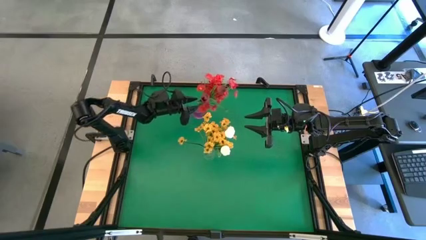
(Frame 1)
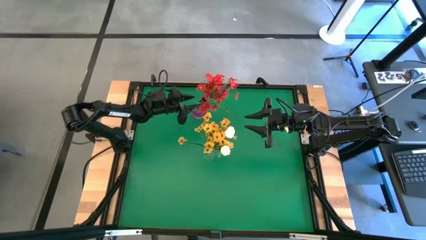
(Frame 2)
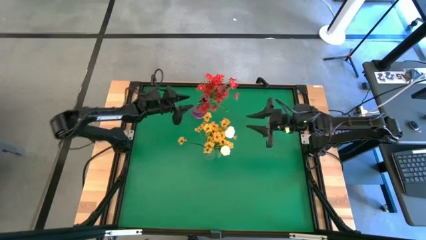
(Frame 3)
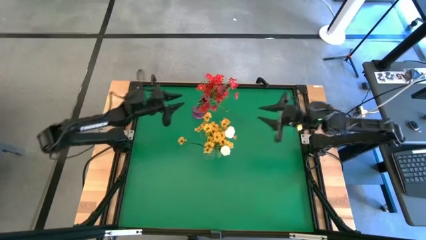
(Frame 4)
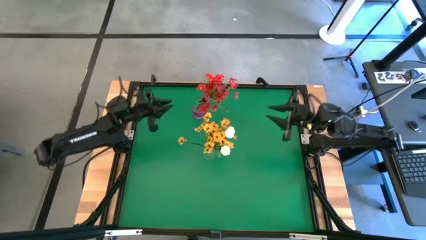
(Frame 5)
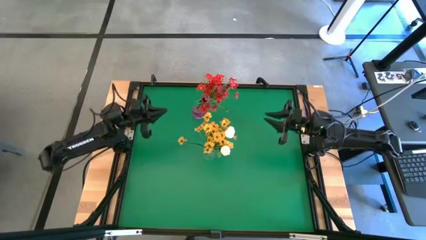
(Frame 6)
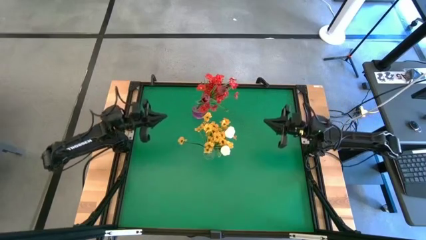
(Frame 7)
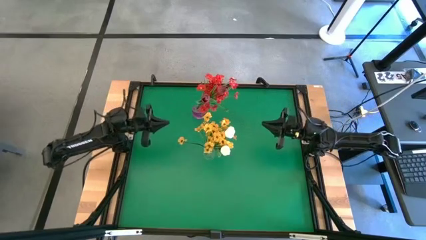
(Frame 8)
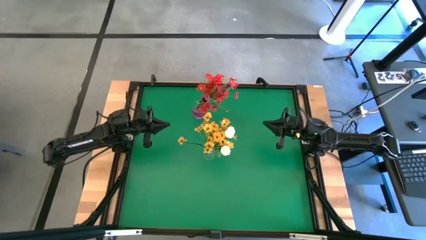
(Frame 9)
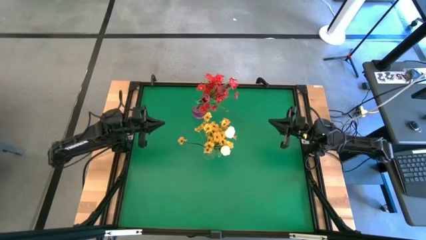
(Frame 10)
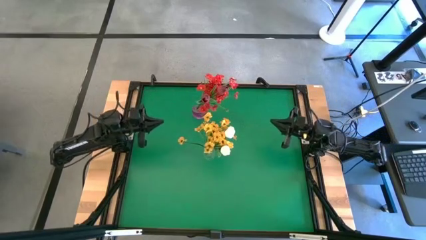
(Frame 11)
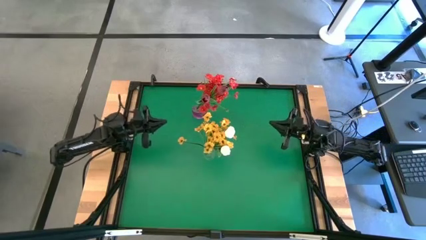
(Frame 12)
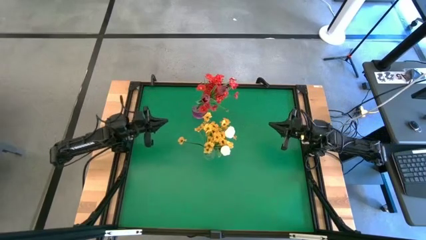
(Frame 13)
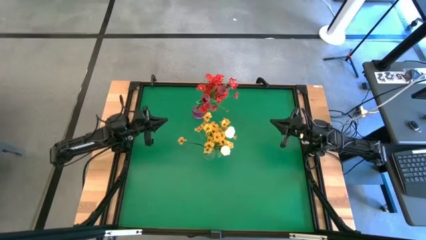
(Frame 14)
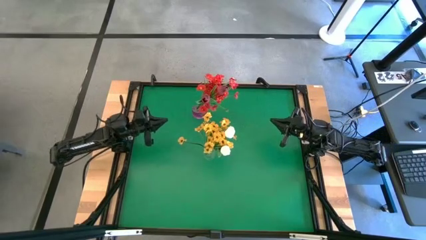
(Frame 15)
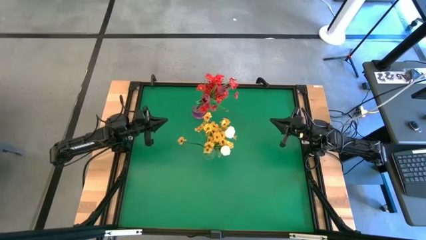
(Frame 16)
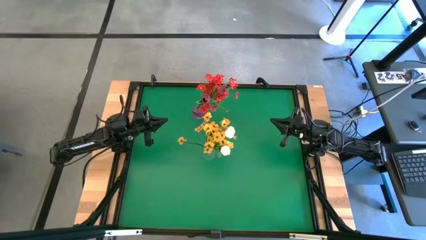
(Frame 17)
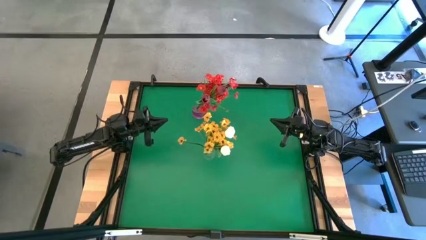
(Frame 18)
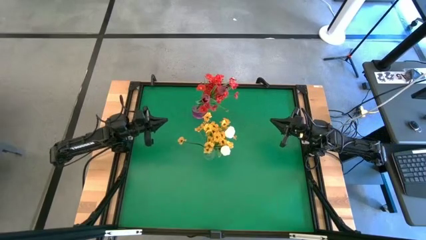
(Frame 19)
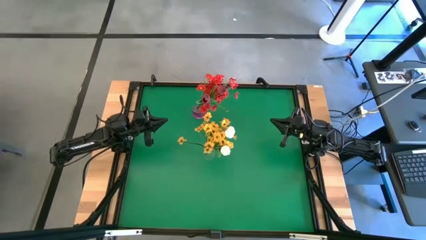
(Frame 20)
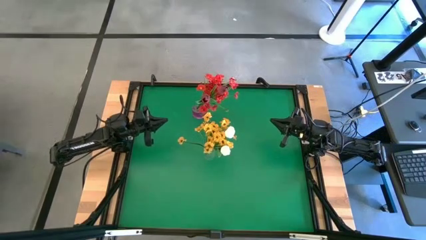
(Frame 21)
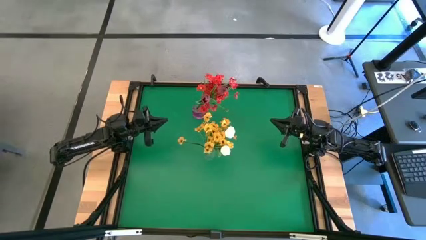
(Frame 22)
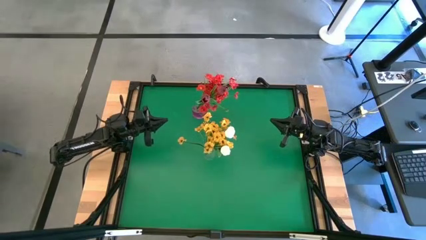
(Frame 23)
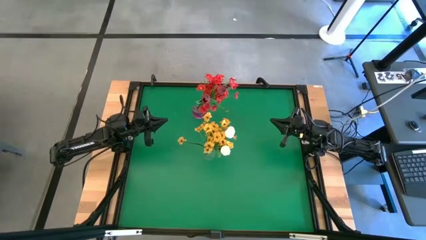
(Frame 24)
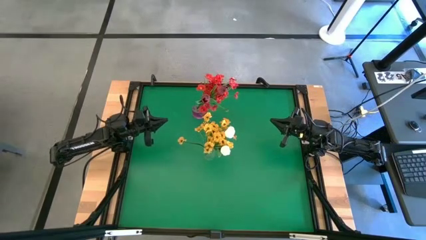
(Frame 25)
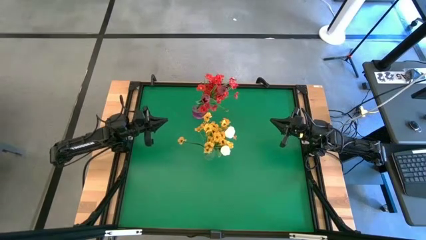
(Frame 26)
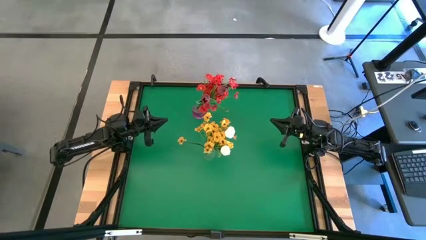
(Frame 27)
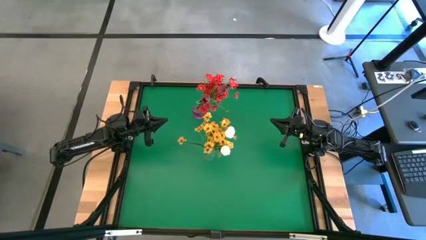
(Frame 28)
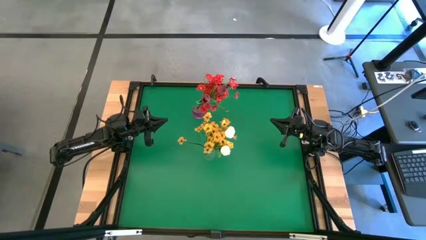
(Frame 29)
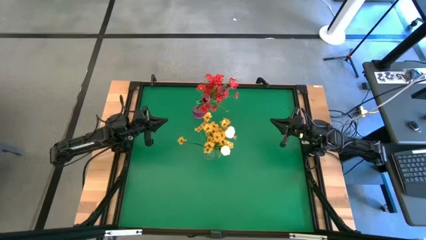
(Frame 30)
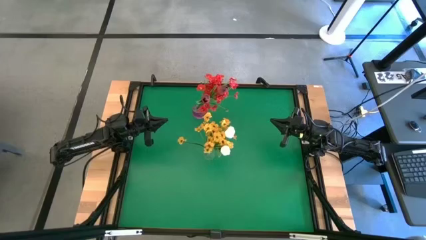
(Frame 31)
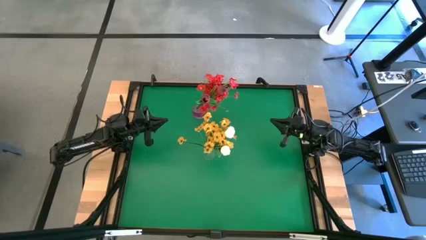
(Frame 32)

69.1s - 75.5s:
Task: Sort flowers into vase by color
Return to Home Position

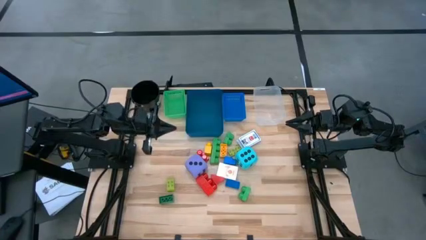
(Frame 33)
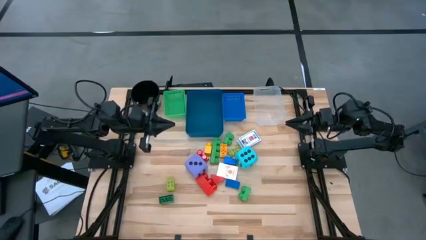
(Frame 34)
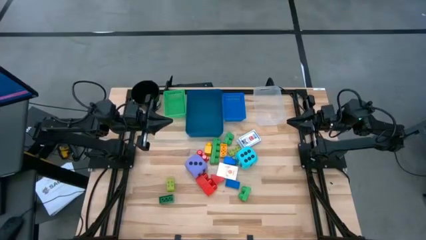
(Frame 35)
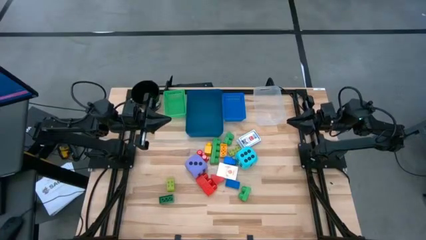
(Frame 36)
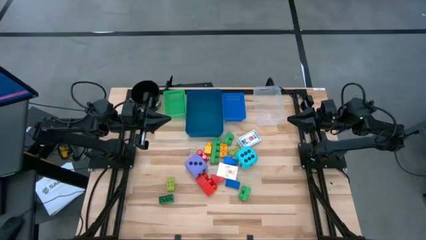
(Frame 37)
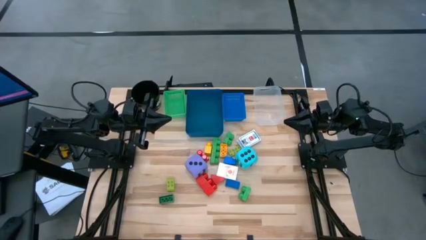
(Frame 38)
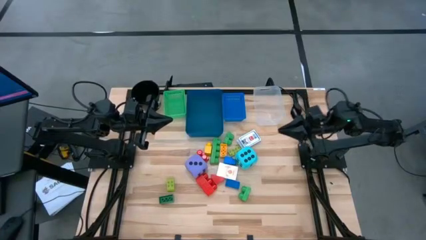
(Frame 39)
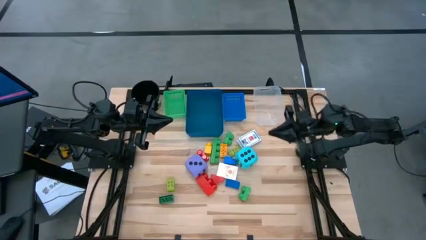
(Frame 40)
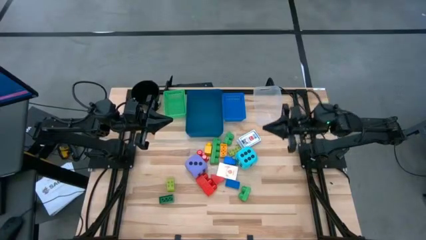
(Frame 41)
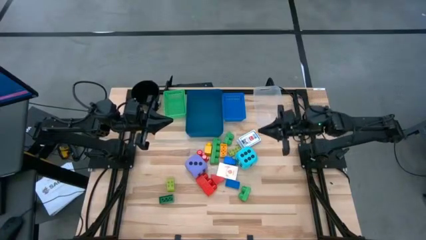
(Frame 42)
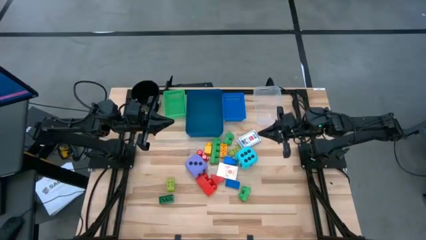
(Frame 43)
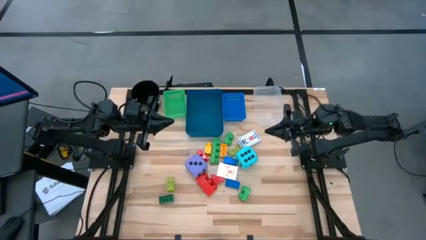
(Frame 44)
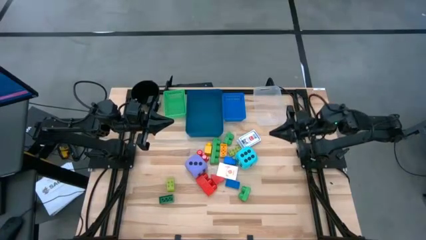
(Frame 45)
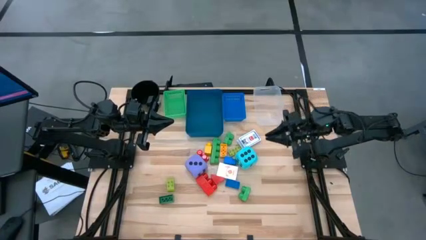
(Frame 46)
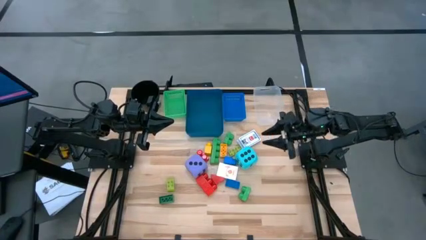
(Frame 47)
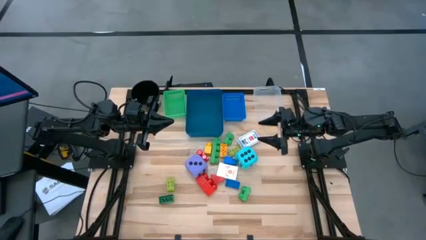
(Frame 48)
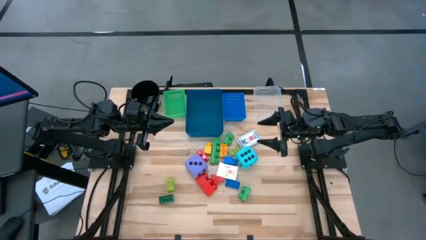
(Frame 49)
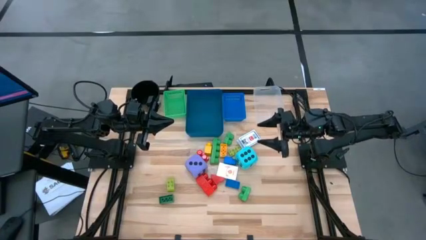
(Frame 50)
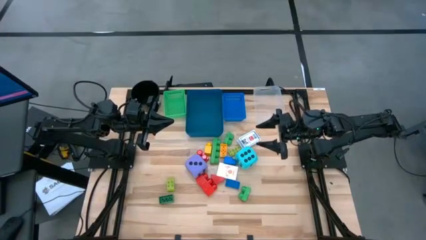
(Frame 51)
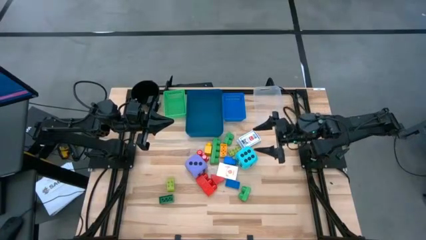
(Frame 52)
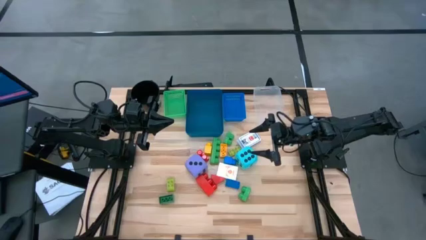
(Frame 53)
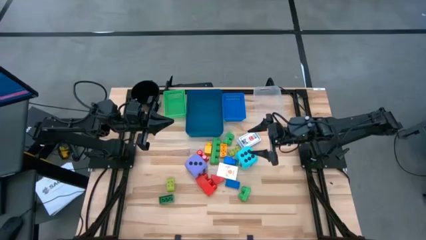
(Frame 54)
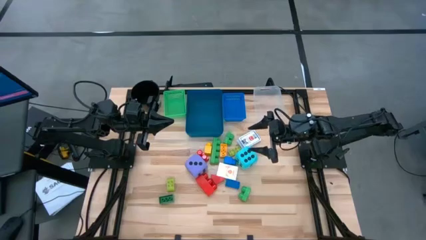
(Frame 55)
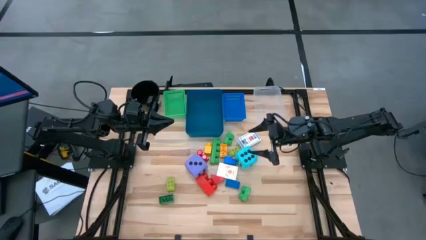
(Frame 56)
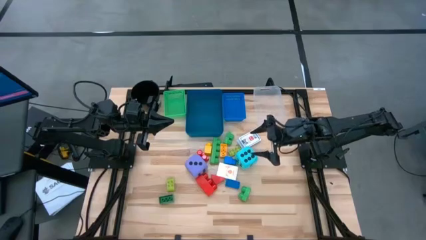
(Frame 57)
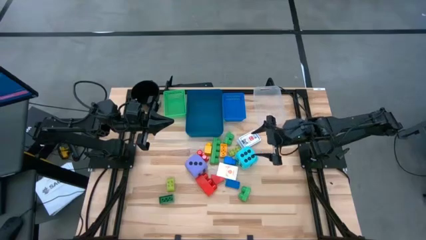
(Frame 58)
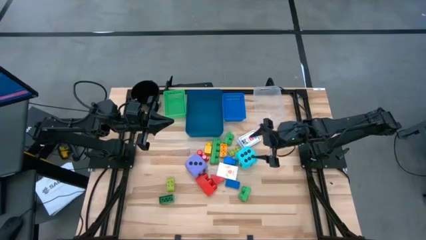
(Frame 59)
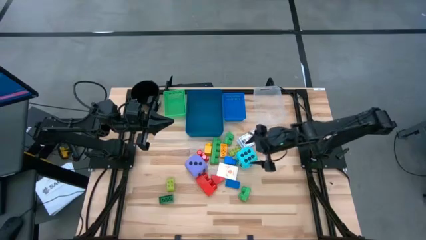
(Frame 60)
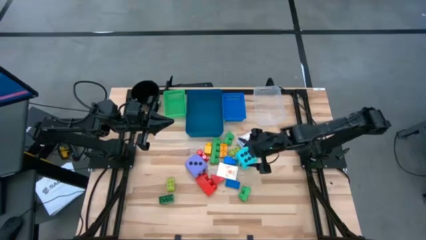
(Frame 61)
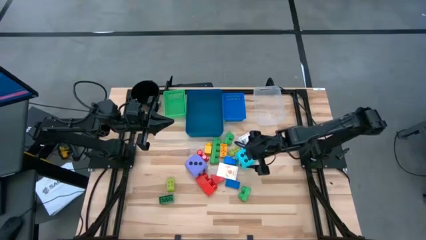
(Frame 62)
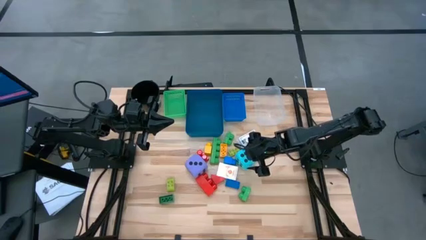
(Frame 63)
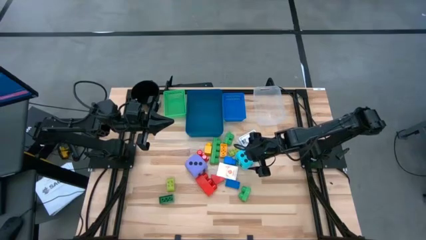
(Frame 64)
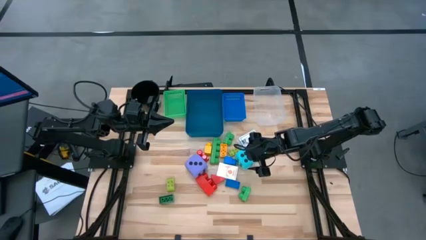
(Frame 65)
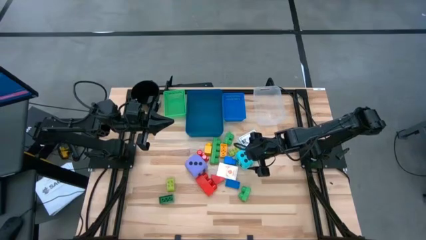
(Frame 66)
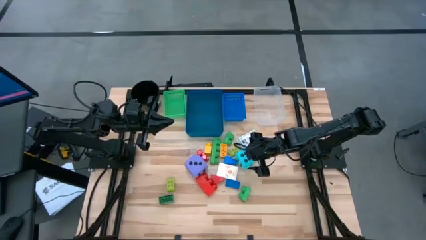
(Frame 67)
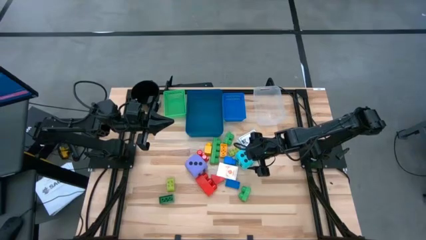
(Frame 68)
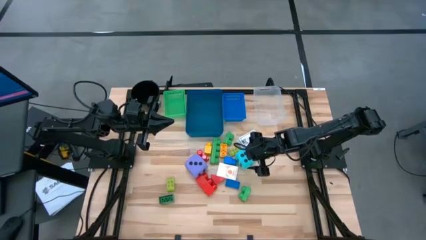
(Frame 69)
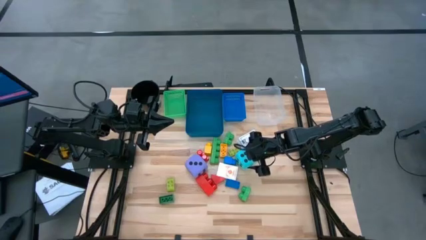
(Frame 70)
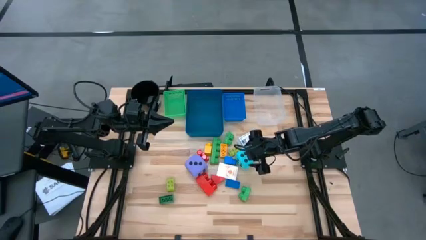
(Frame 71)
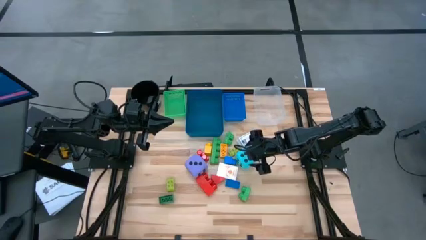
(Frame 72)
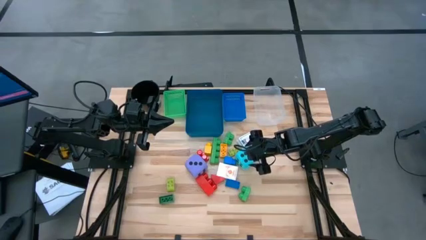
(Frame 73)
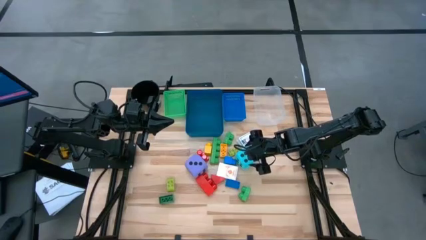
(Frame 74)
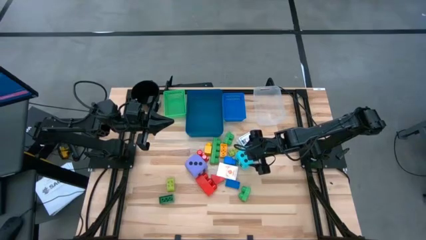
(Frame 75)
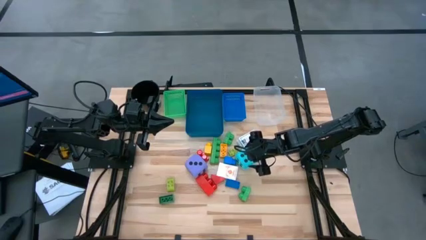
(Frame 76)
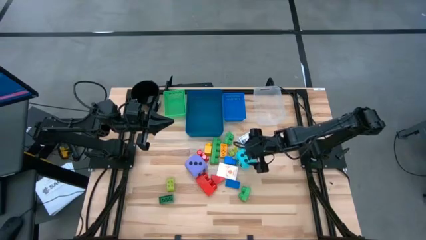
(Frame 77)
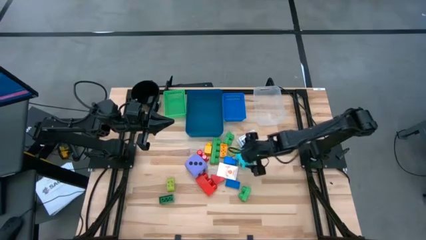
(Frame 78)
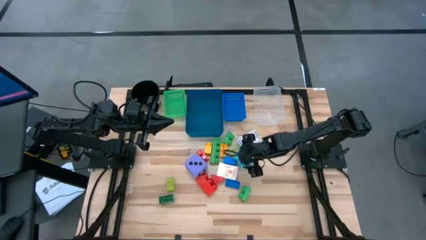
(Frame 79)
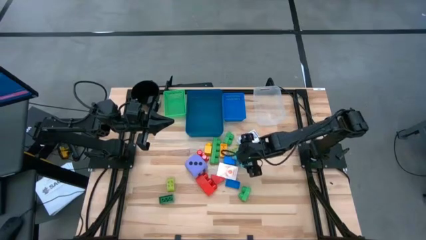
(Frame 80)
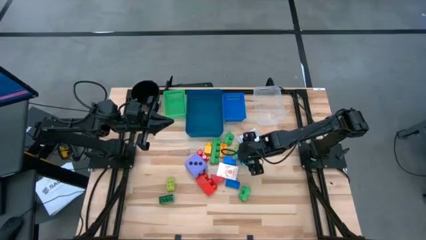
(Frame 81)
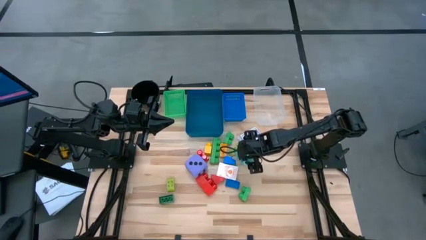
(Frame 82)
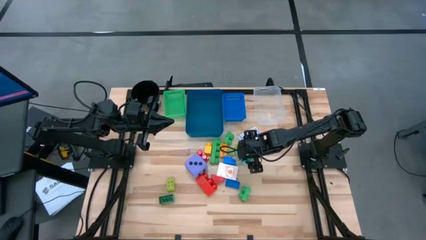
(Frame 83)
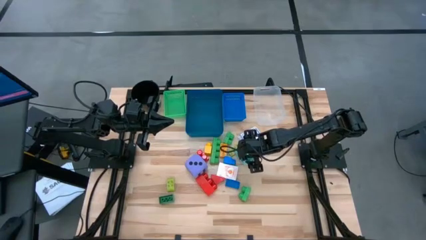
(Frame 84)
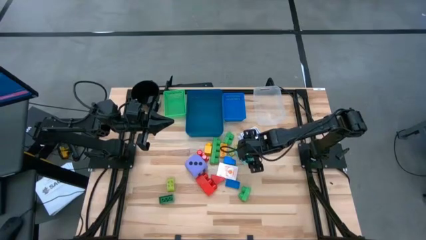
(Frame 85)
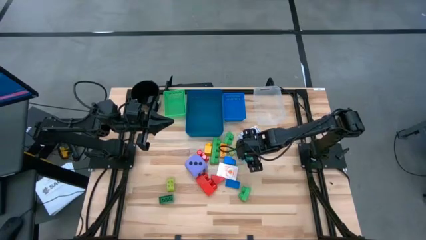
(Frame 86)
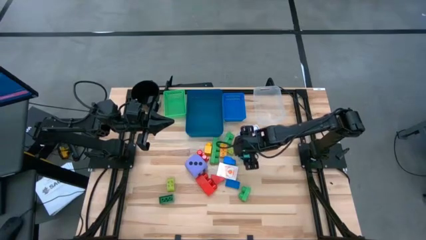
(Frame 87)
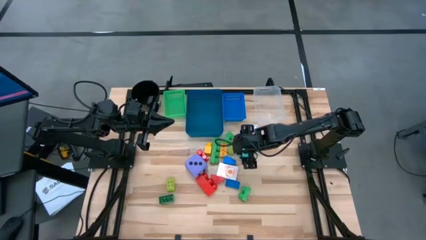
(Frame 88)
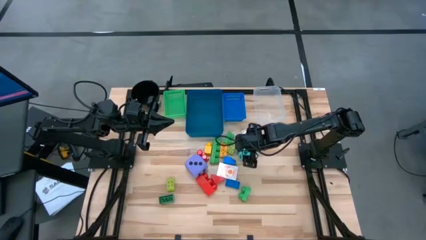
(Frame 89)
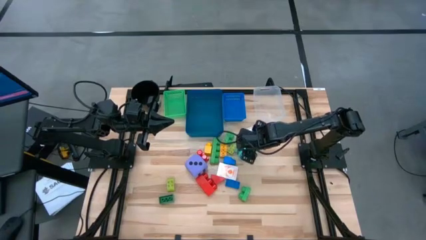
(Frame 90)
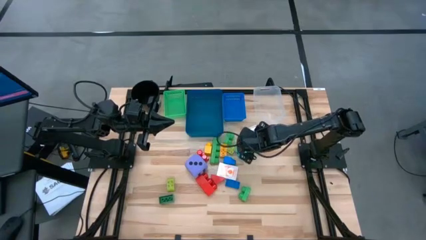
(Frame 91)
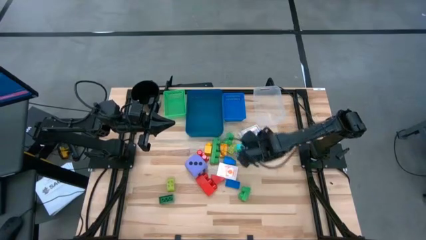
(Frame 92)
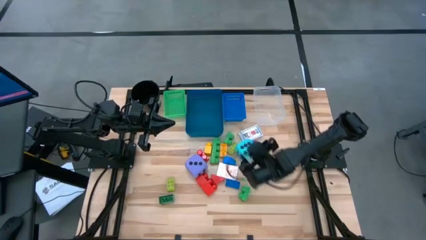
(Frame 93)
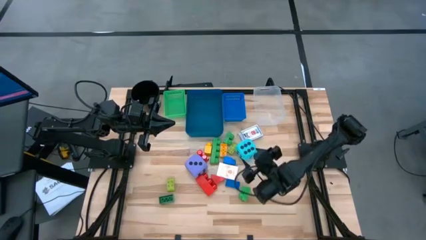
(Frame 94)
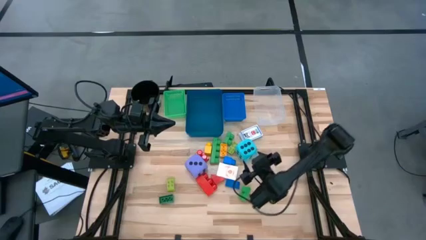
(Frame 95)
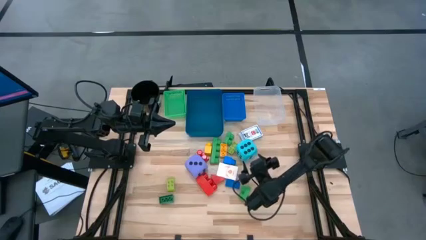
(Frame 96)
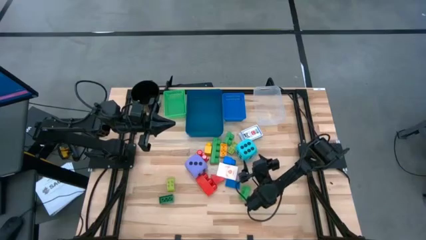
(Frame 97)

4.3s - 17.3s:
Task: Pick & Place Toys
Put the large green game piece into the transparent bin
